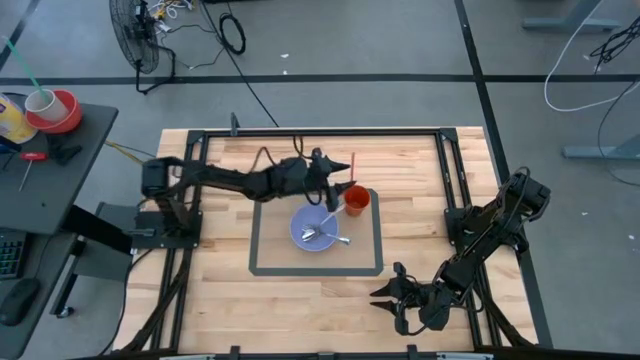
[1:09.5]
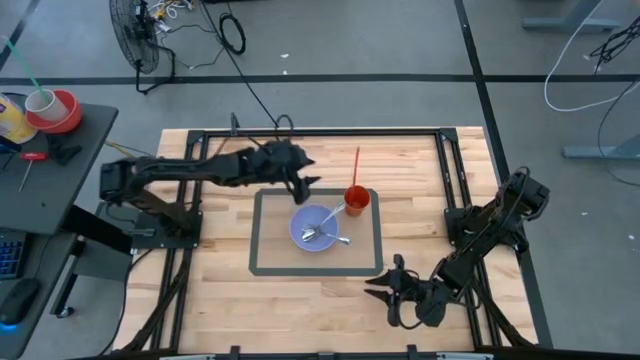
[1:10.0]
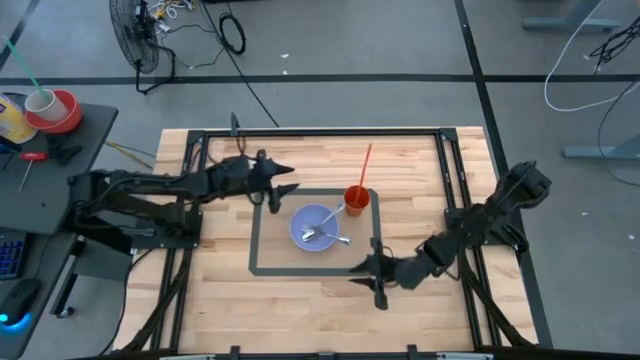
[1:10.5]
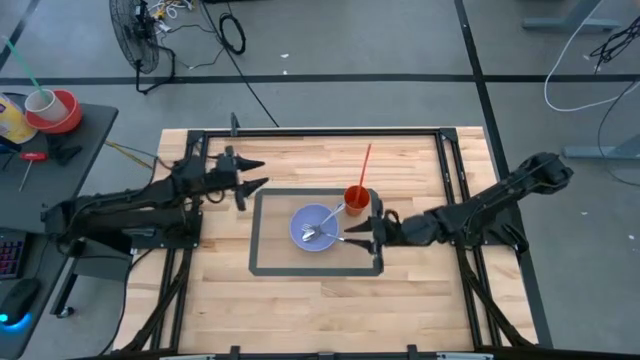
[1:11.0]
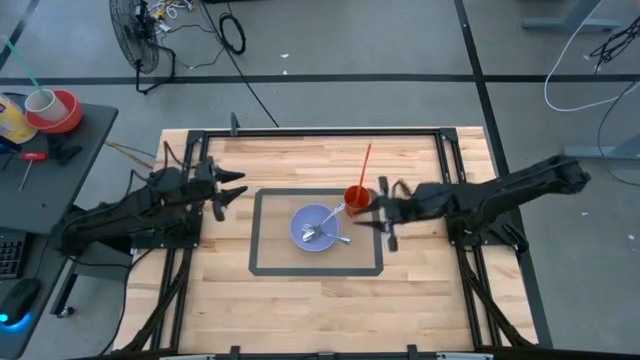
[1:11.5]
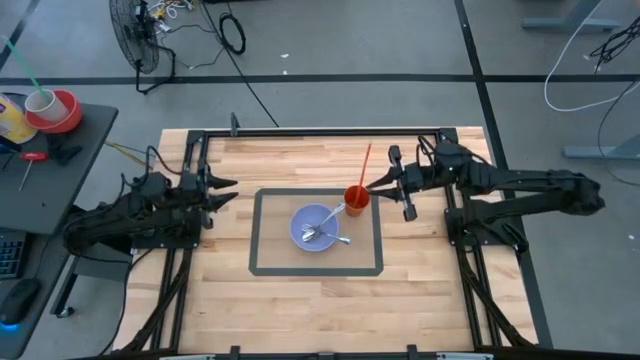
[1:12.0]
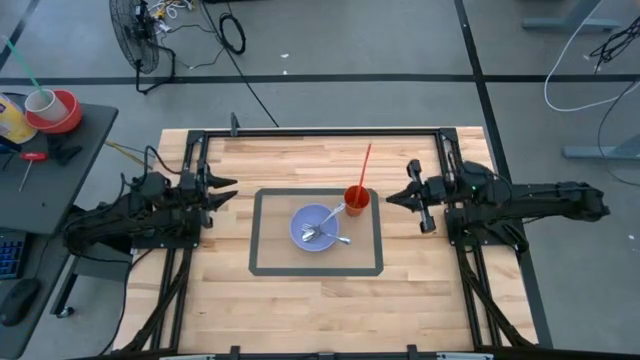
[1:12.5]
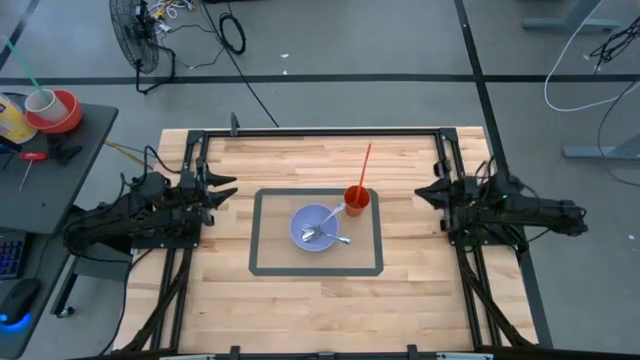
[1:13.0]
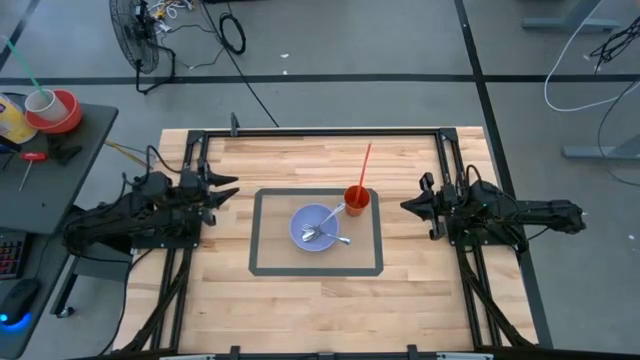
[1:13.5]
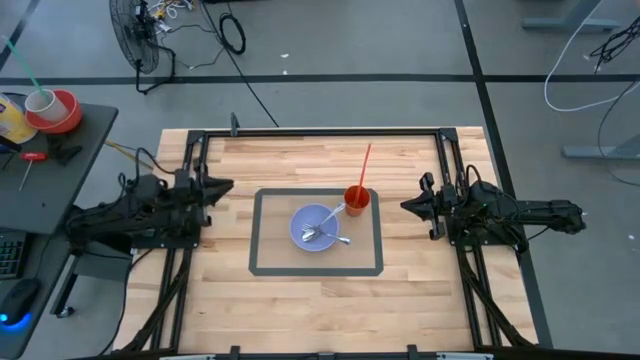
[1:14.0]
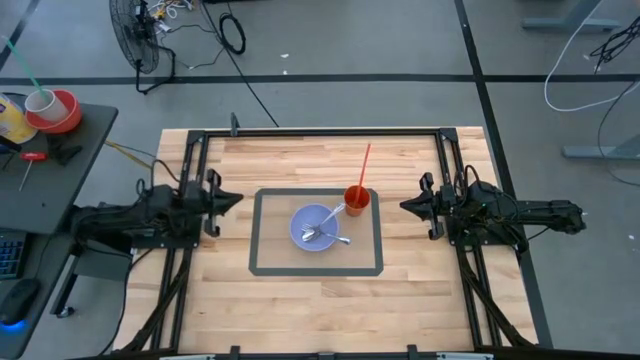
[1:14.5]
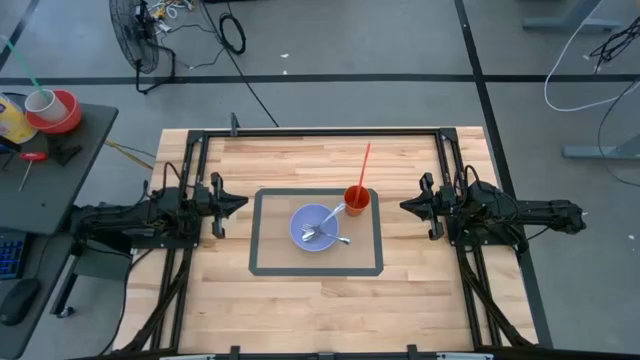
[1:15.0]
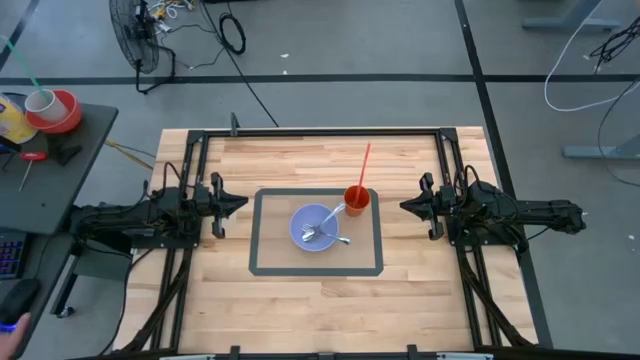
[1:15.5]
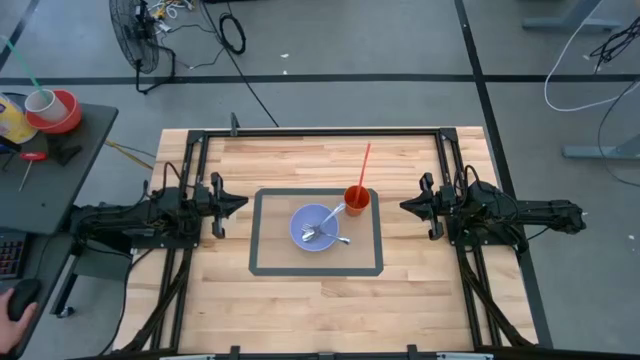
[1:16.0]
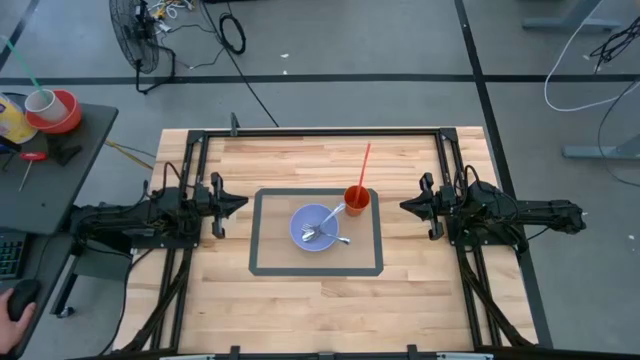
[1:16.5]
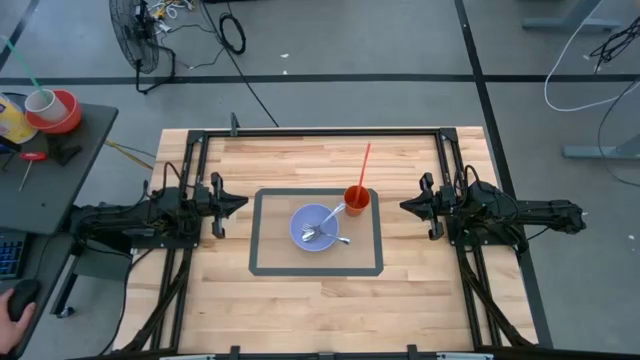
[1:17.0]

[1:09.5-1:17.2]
Task: Pick & Place Utensil
Return to Home Position

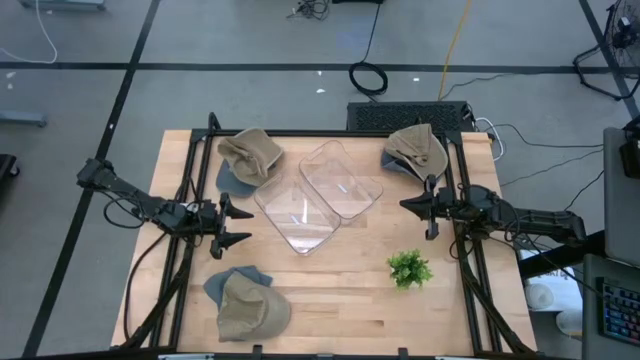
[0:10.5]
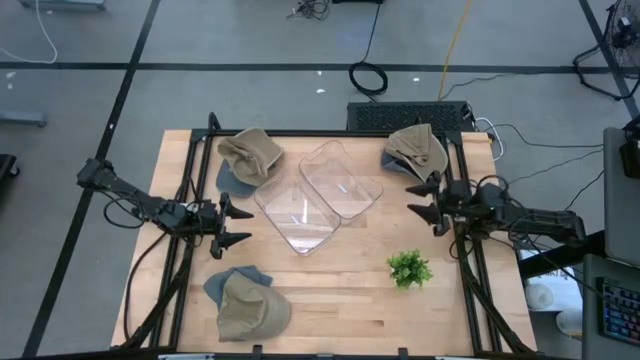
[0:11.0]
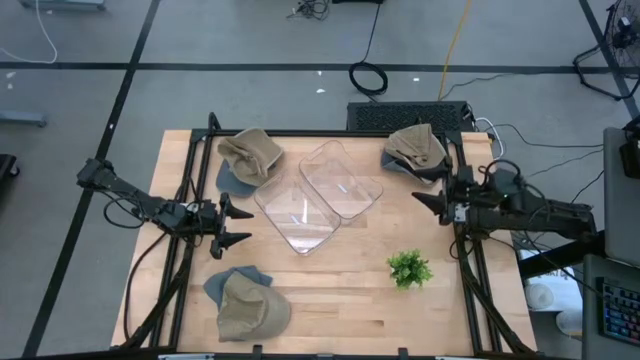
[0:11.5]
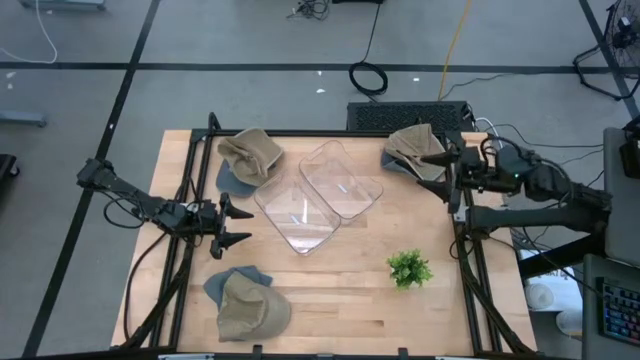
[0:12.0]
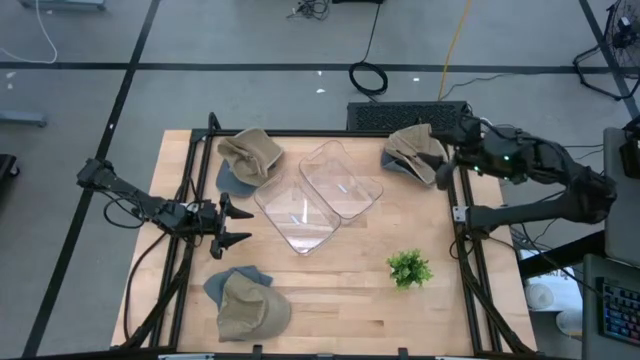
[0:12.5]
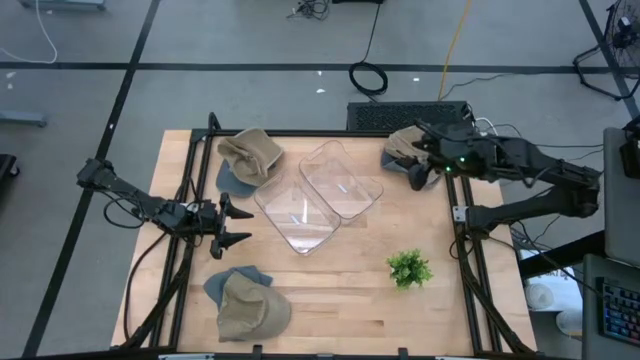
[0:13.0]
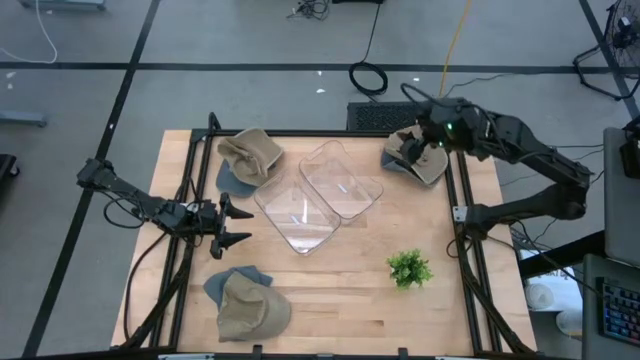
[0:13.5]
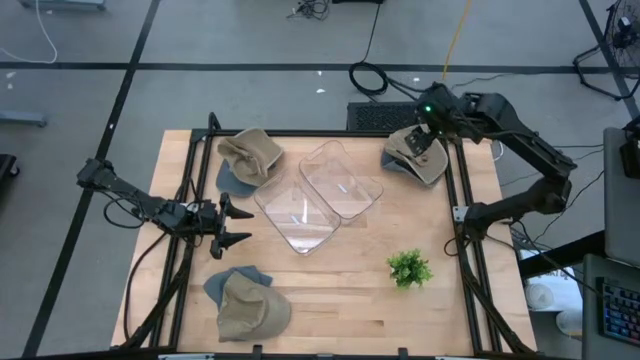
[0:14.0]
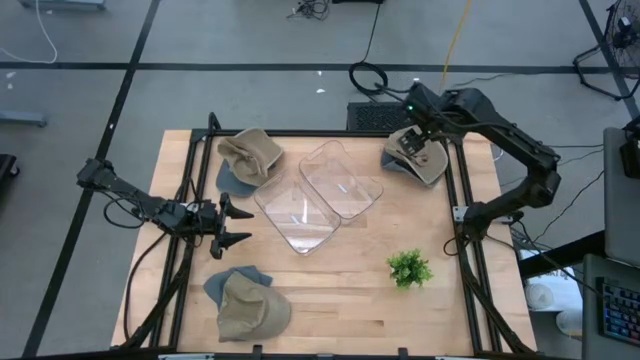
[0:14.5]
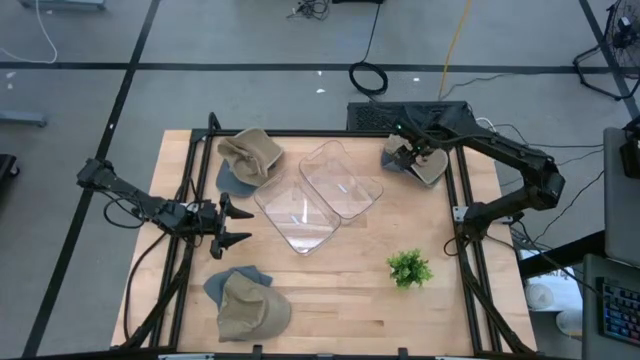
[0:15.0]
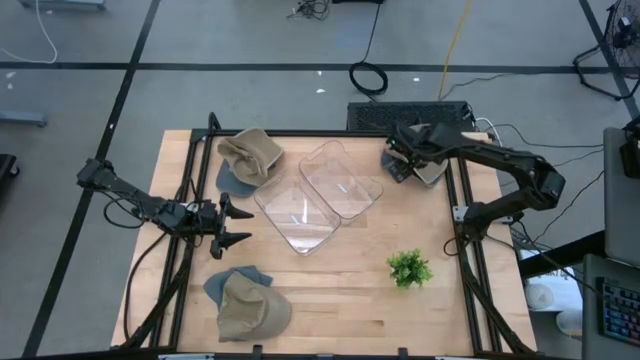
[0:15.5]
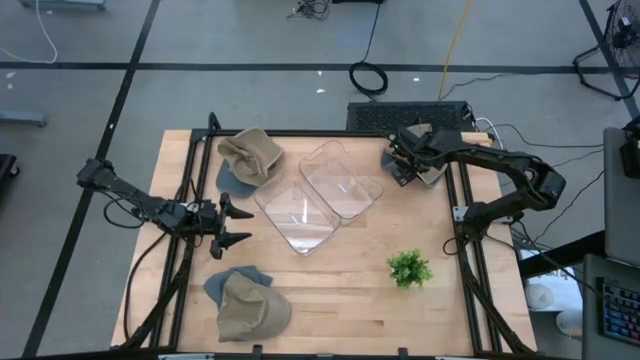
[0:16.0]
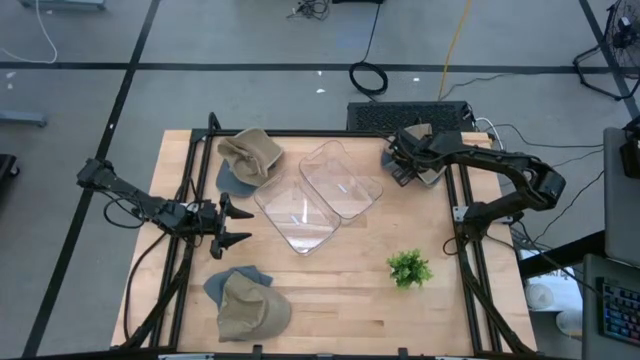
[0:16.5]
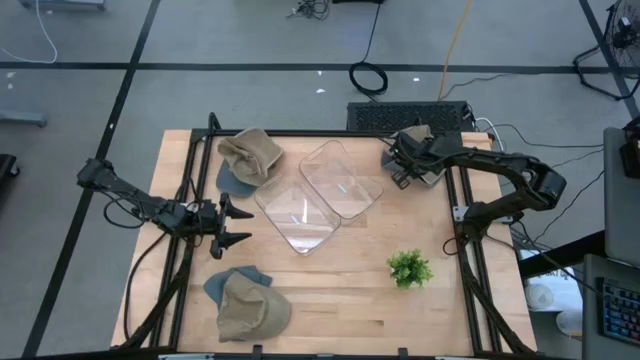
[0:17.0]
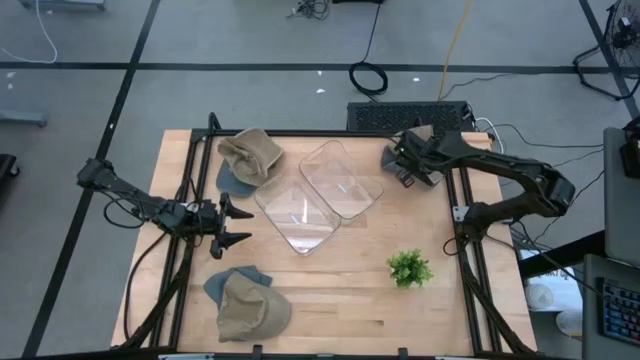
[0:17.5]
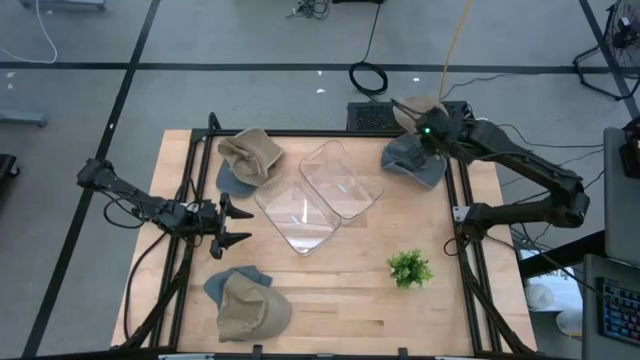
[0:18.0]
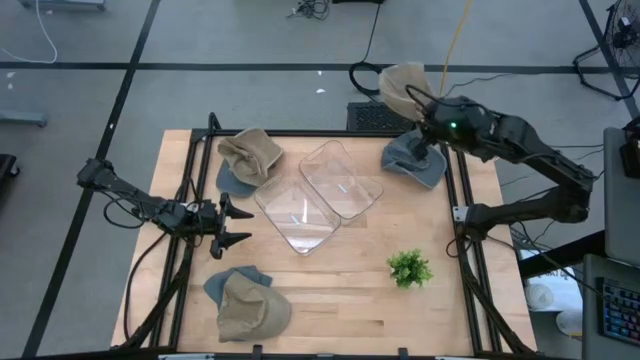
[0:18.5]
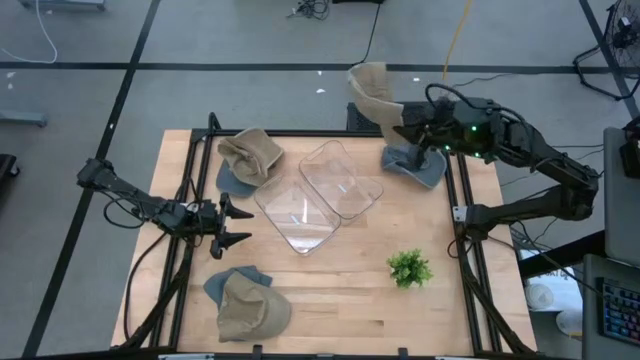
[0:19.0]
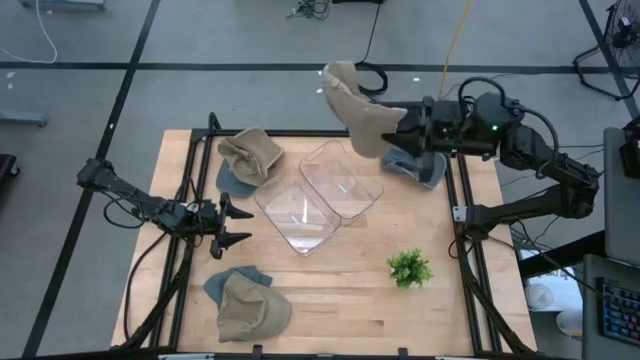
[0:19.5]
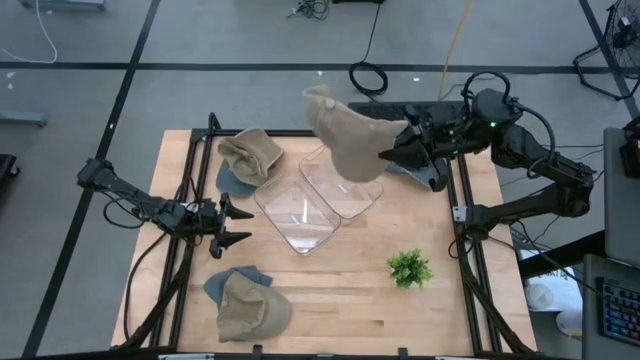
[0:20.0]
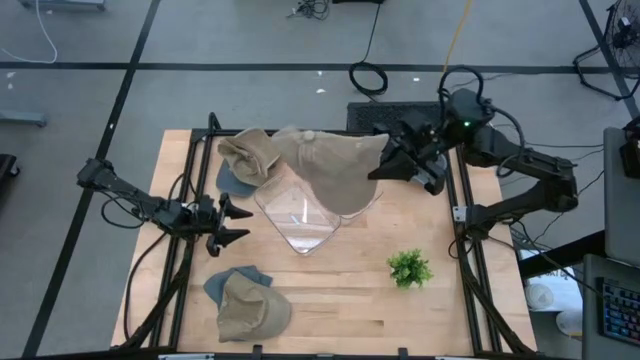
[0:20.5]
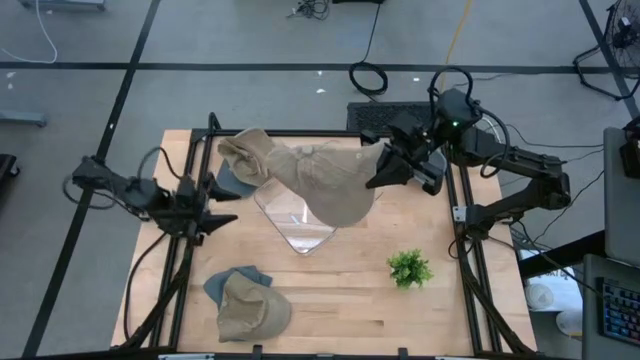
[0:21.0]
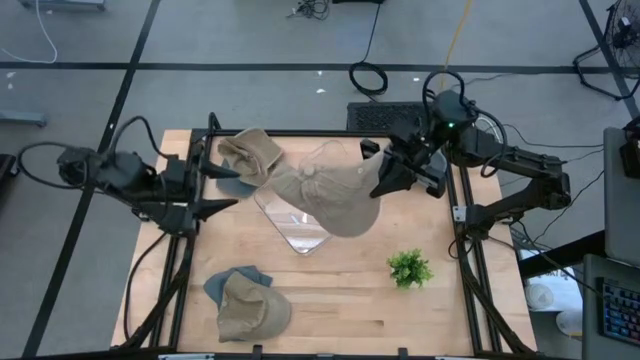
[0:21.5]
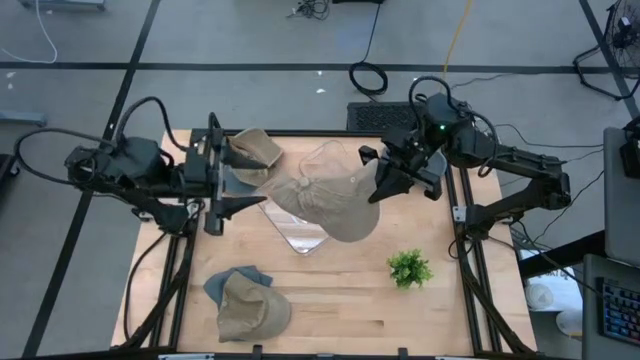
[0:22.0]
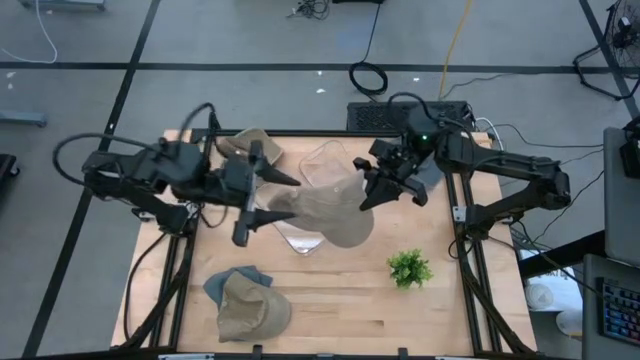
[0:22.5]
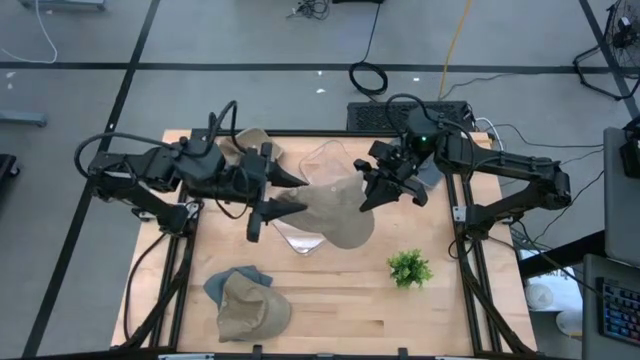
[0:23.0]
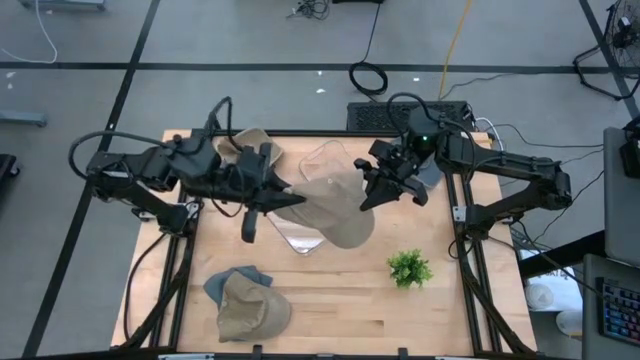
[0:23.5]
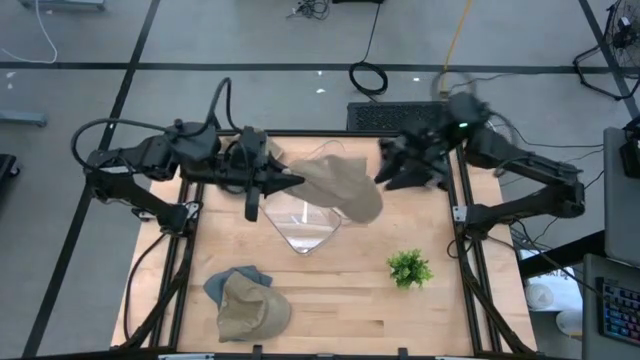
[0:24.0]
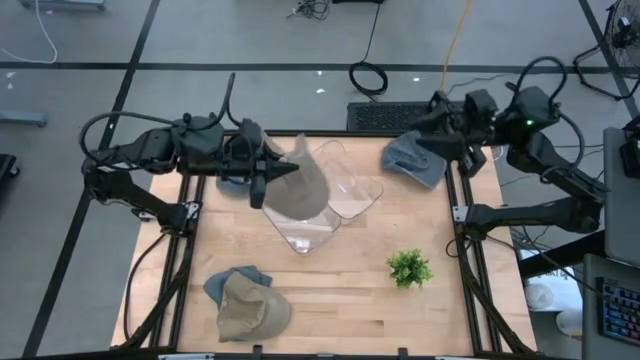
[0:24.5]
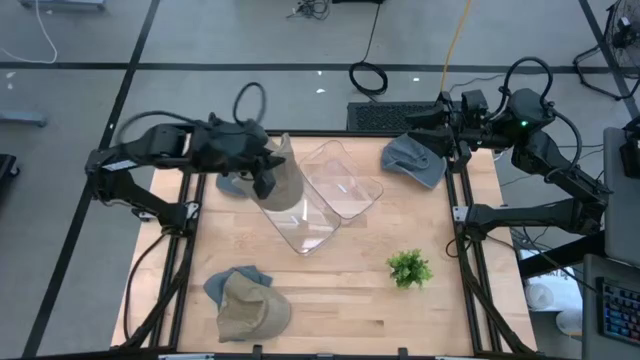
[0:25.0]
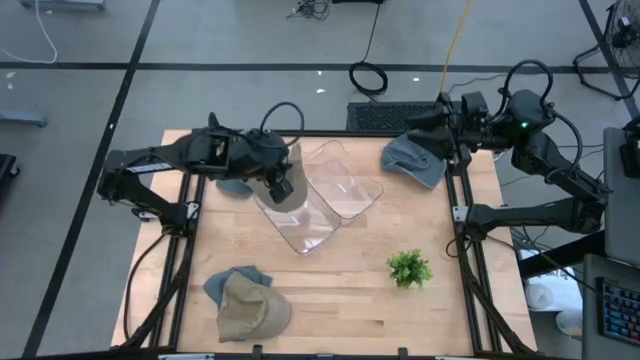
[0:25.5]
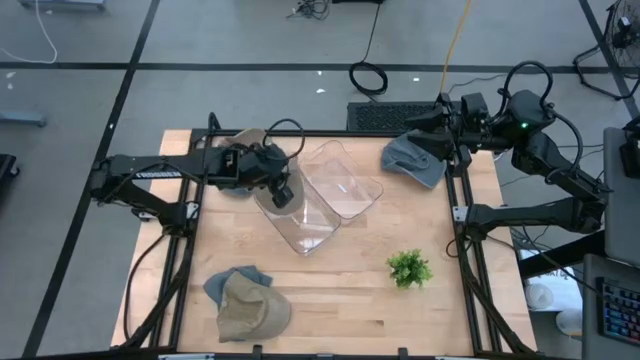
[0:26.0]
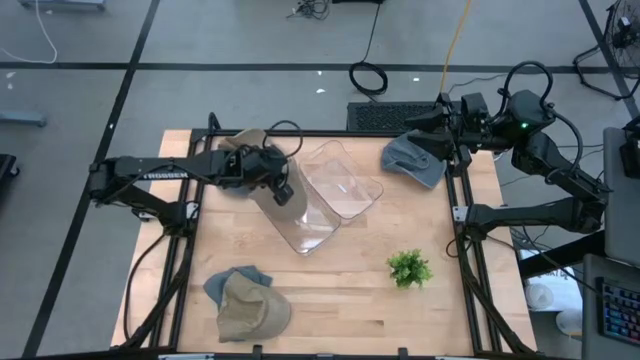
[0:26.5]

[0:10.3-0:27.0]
Task: Pick & Place hat
Put the top right brown cap into the left transparent bin
